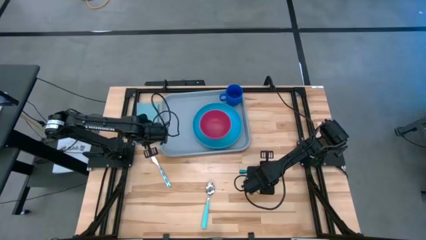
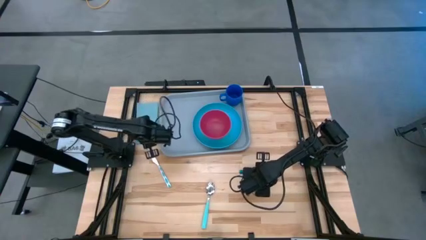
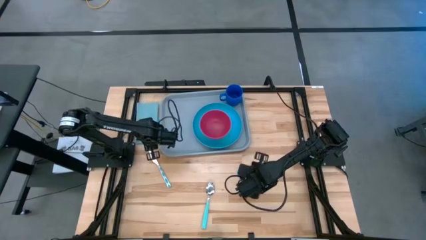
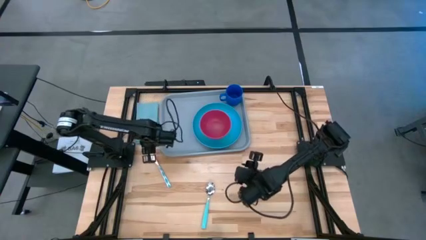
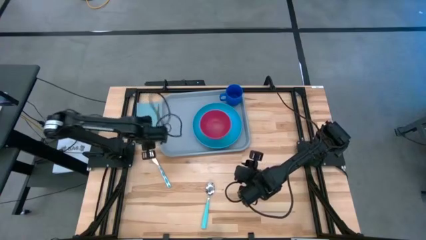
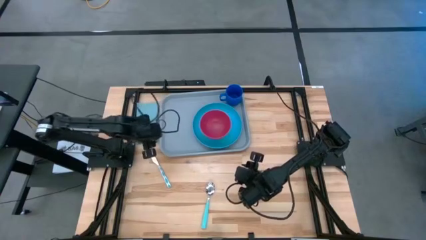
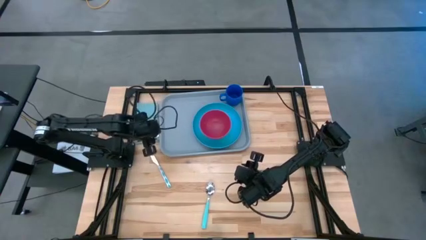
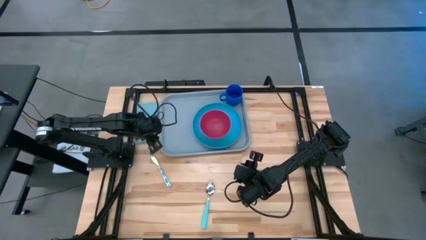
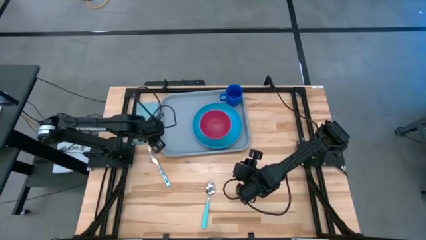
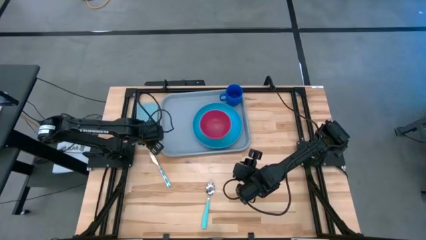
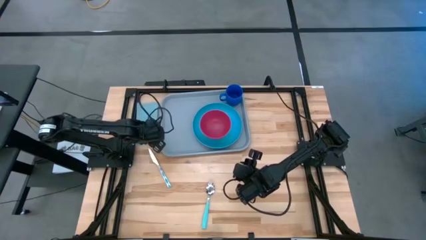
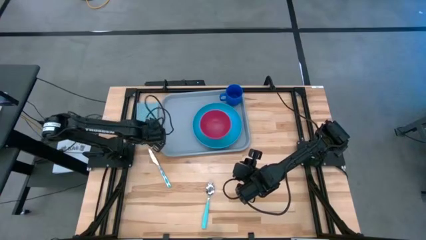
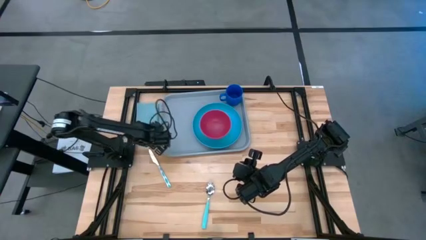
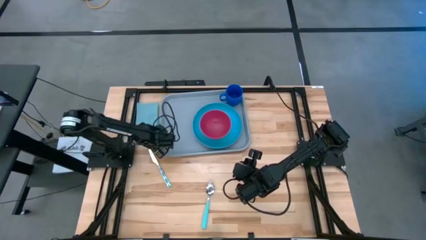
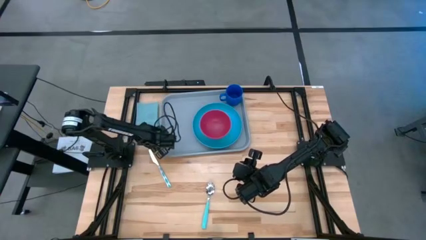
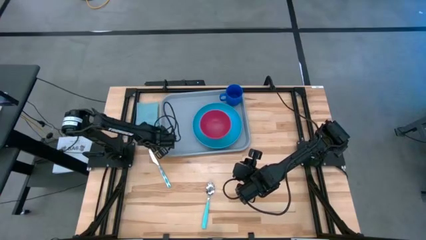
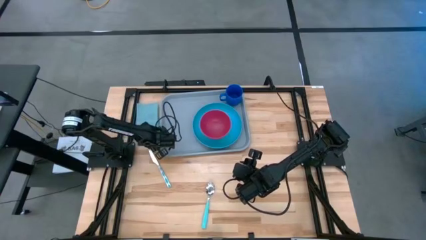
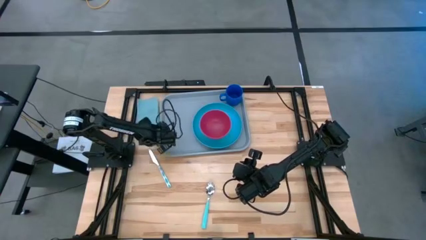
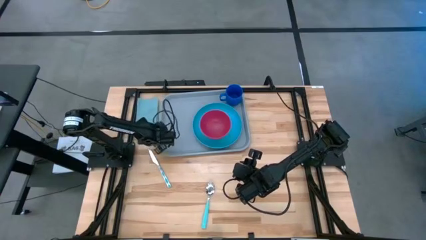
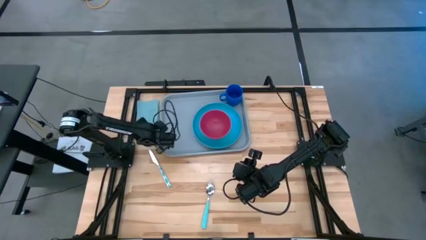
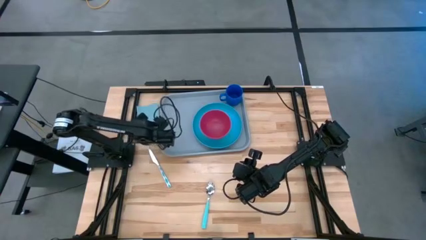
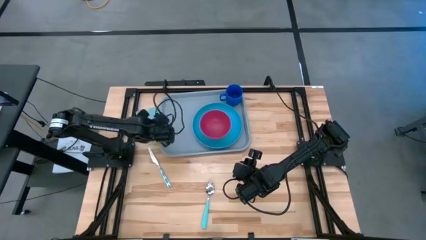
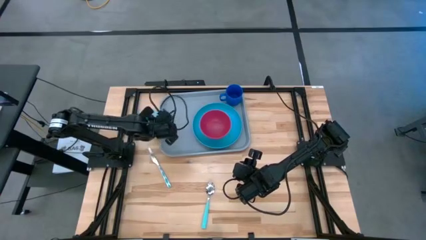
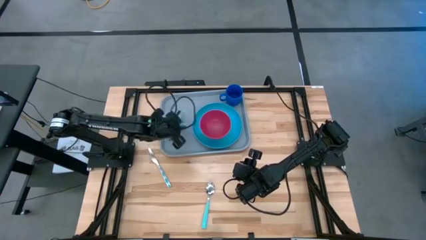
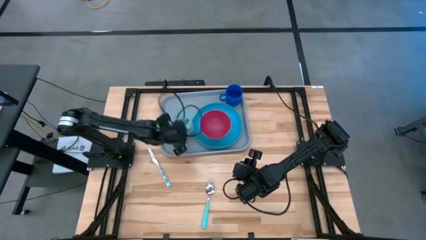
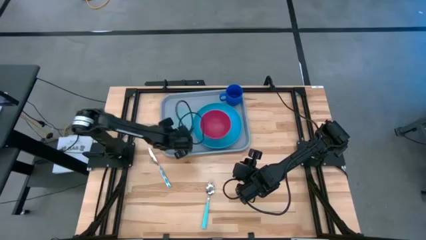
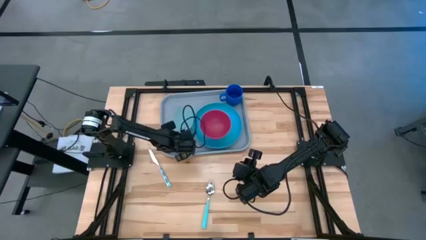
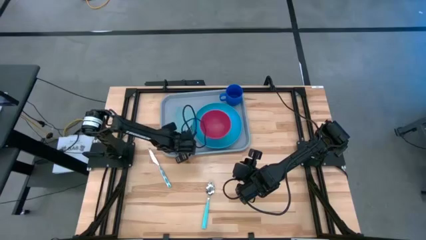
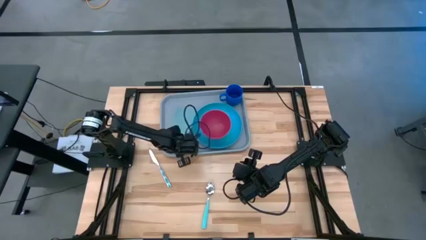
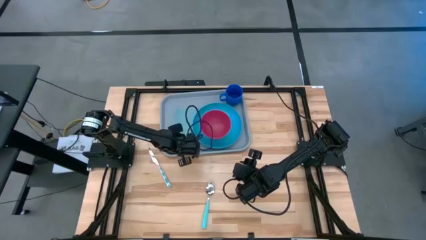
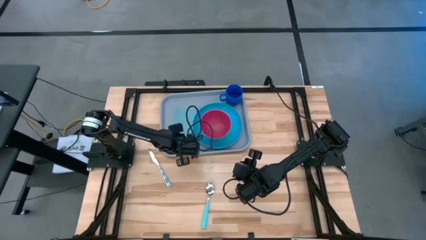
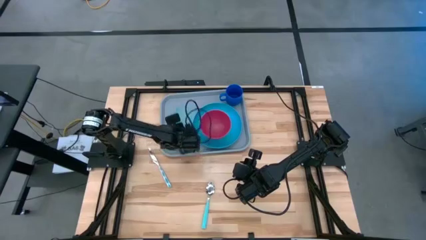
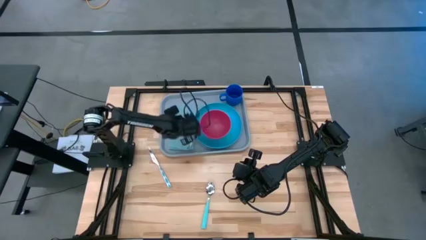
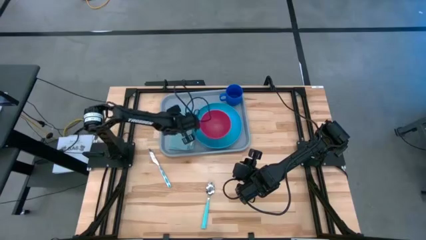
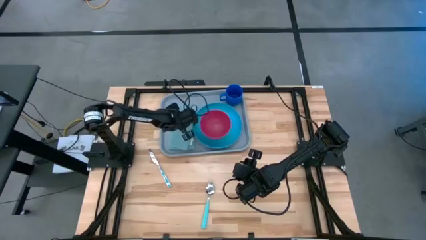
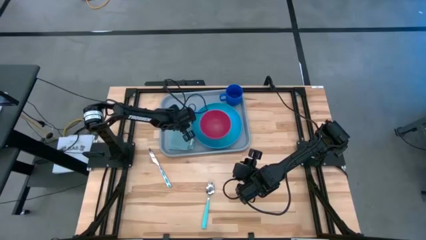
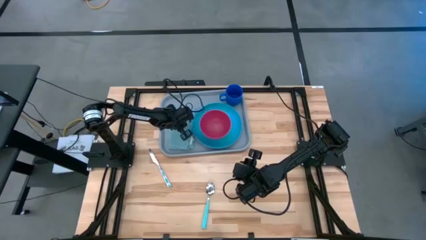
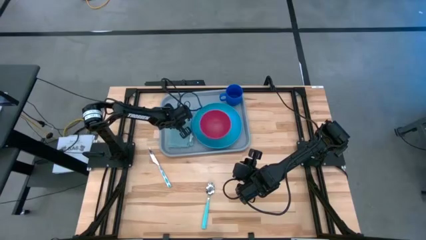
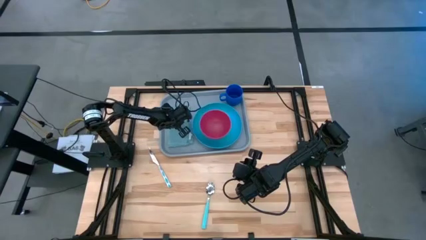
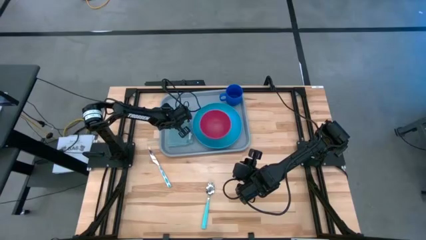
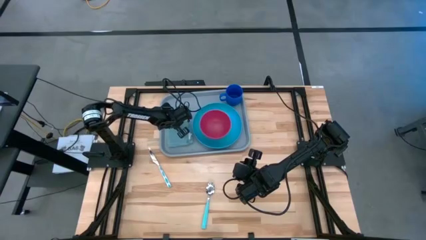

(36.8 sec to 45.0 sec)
Task: Set up tray
Put the blue napkin on the gray tray

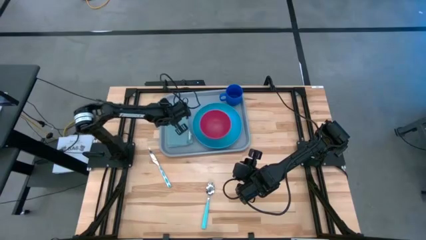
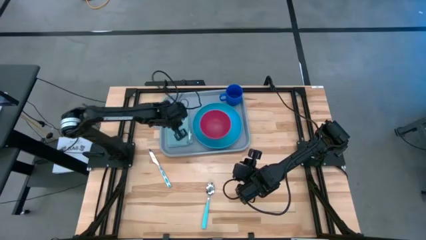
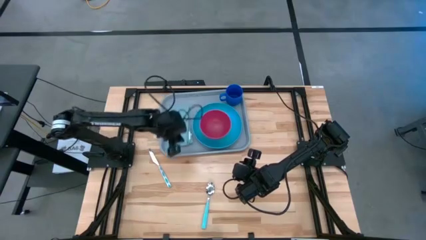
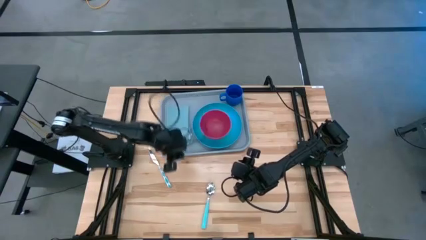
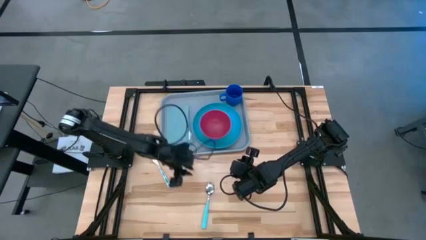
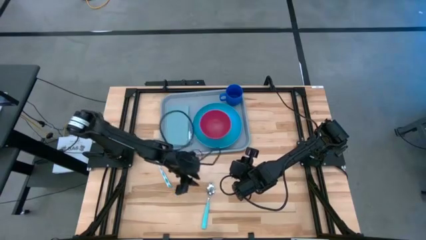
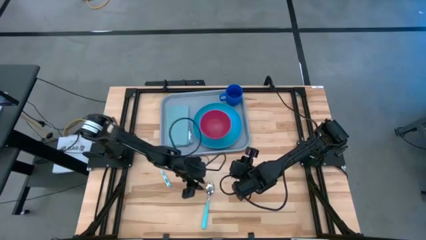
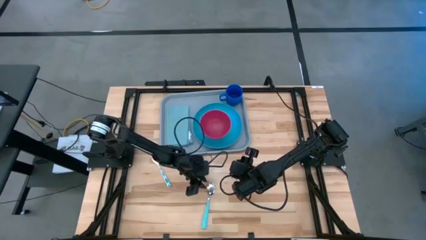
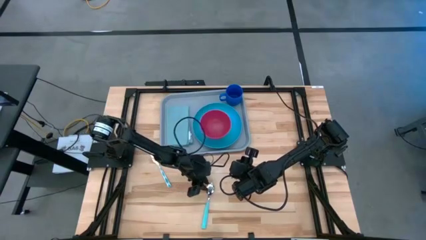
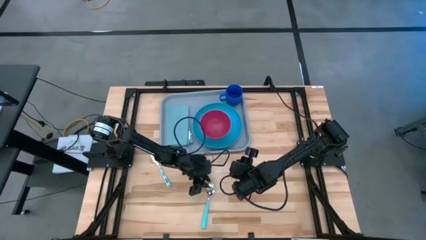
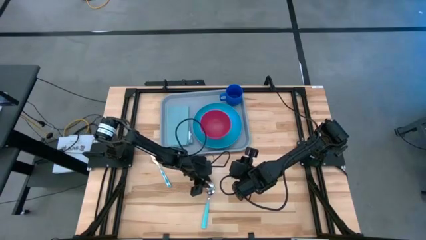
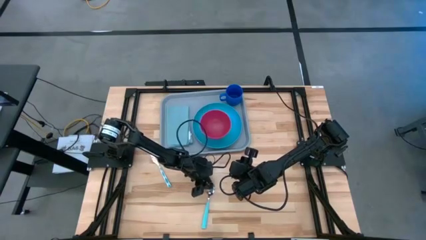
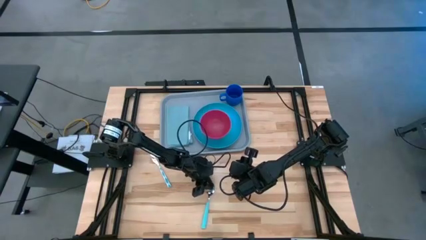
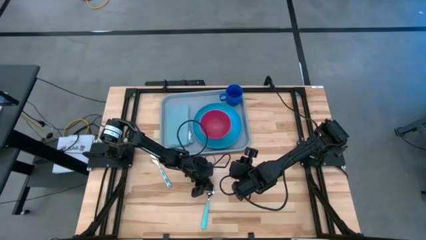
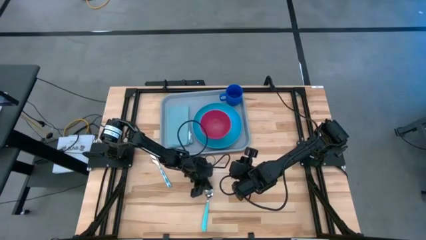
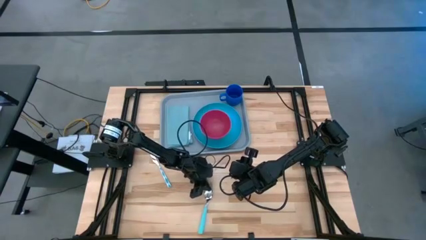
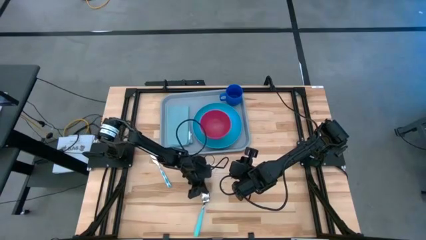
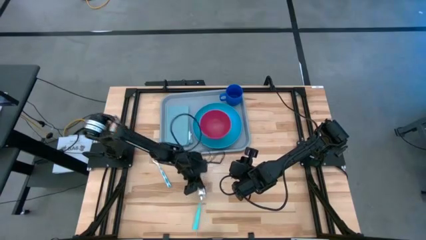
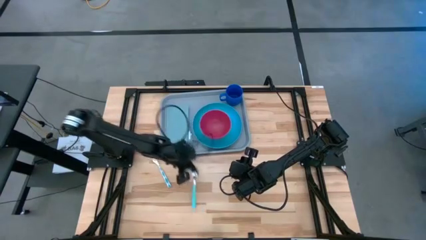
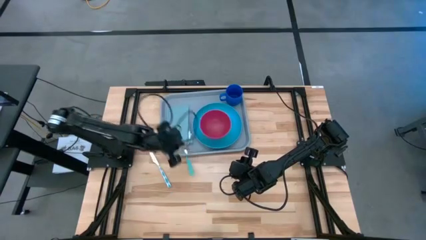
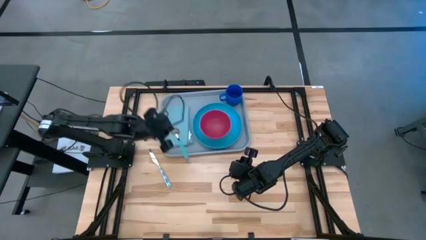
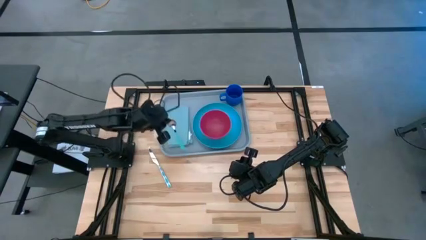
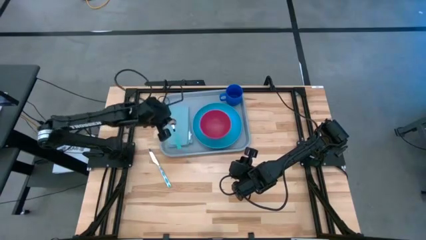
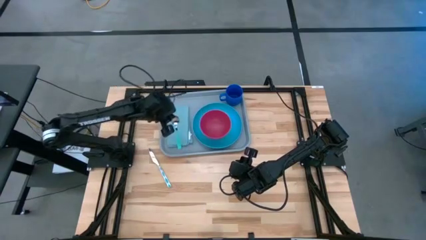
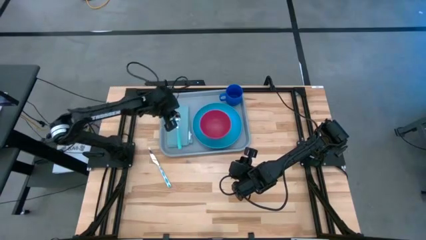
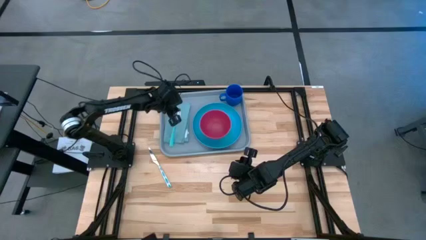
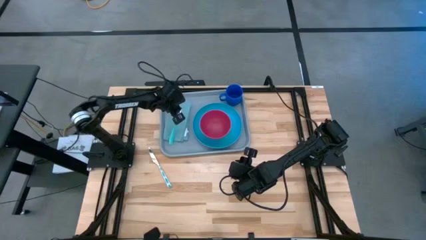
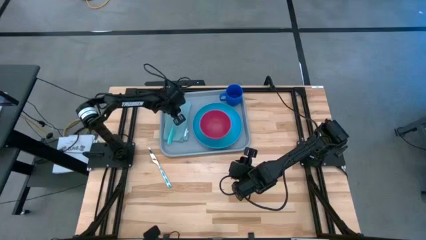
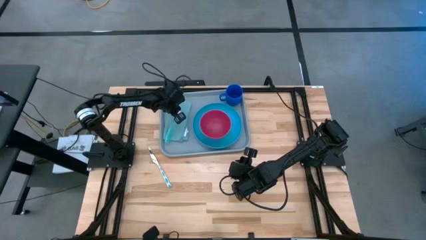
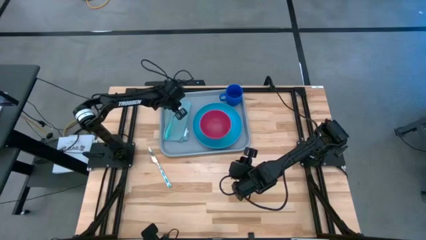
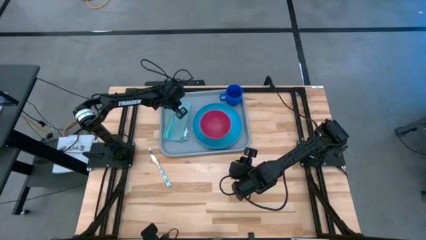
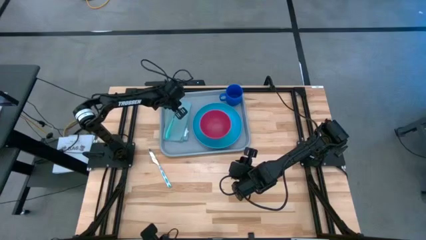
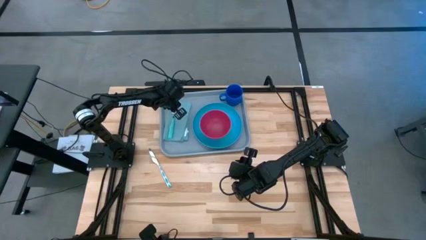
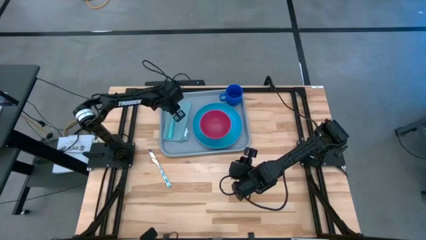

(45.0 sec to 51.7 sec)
Put the green spoon on the blue napkin

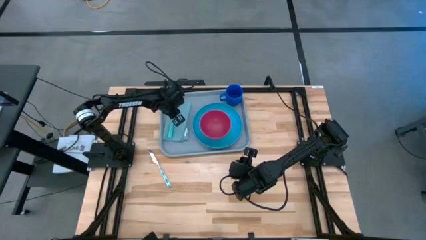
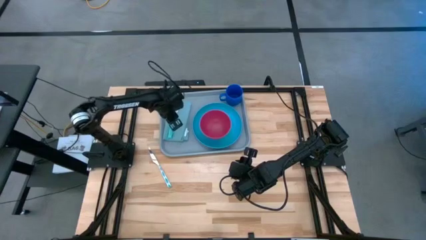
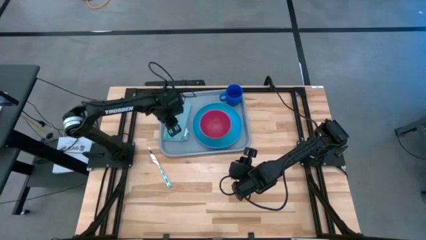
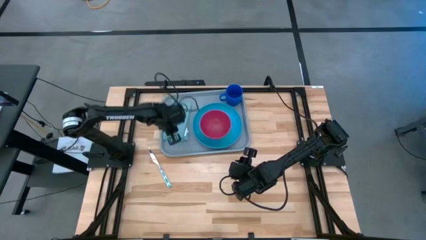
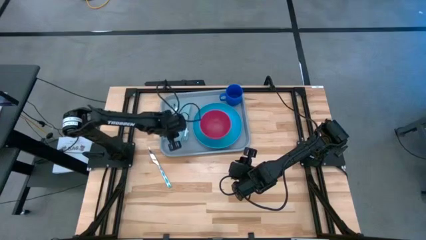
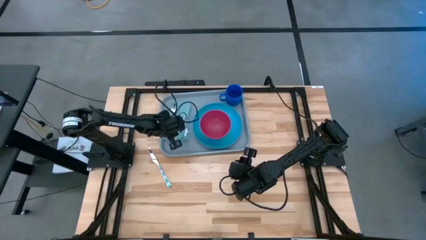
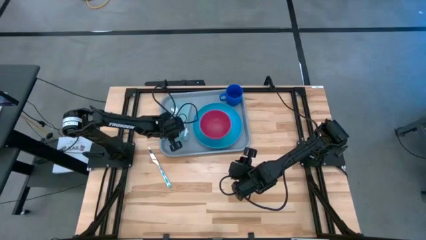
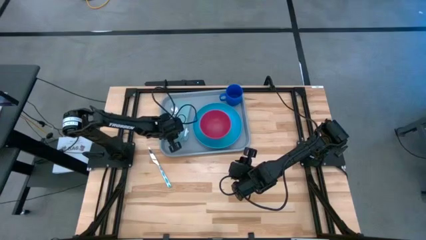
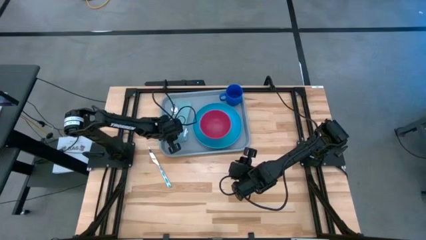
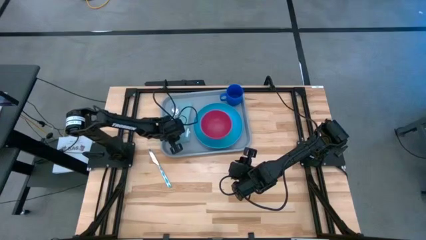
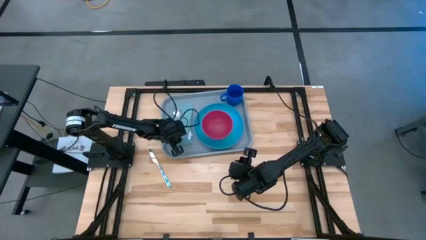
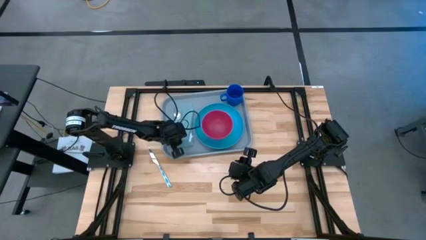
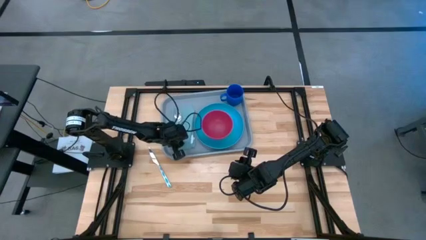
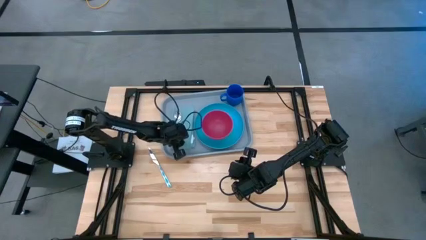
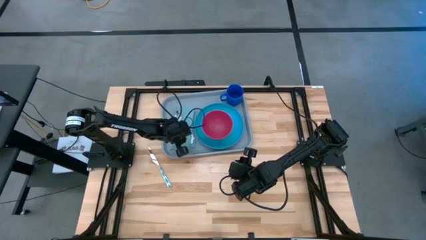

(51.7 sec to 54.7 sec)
Adjust the blue napkin
